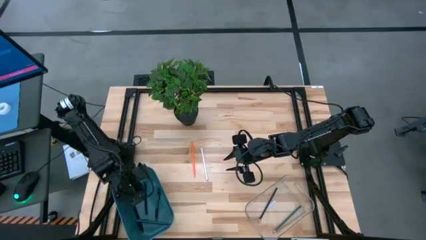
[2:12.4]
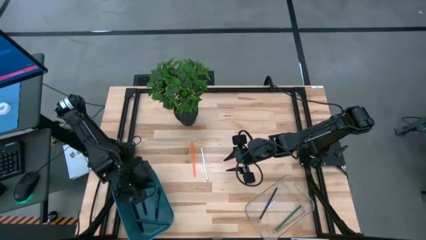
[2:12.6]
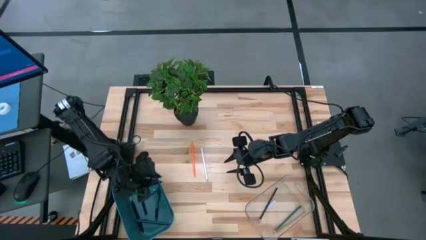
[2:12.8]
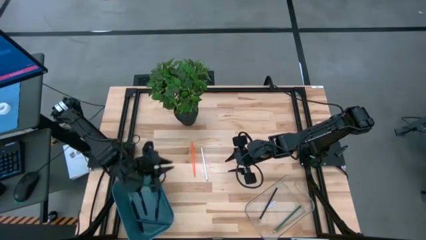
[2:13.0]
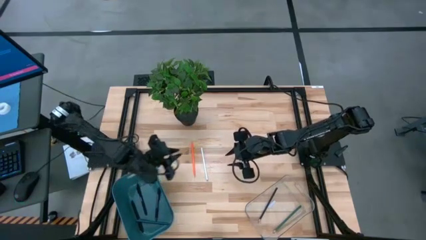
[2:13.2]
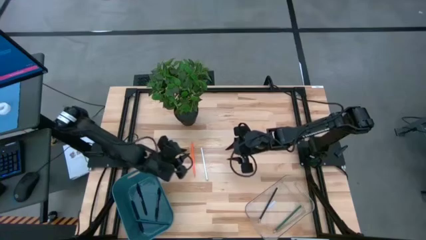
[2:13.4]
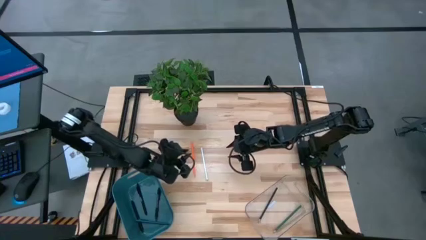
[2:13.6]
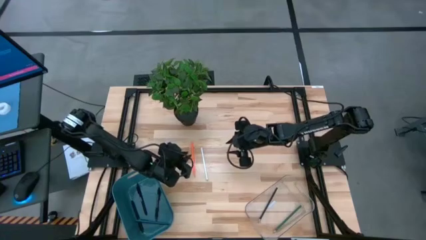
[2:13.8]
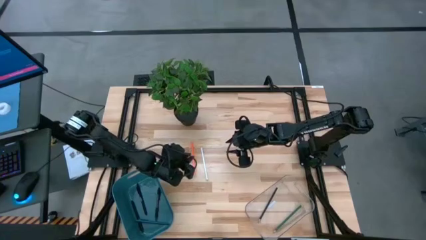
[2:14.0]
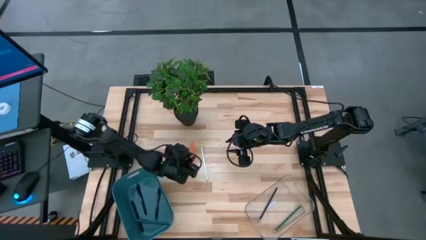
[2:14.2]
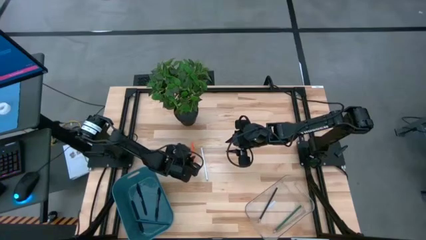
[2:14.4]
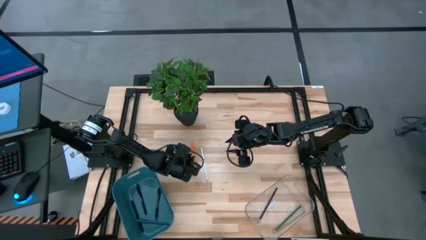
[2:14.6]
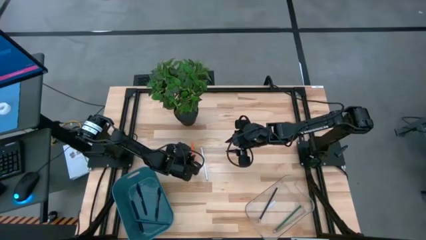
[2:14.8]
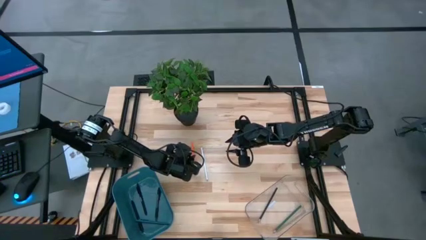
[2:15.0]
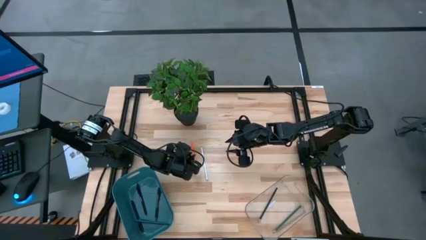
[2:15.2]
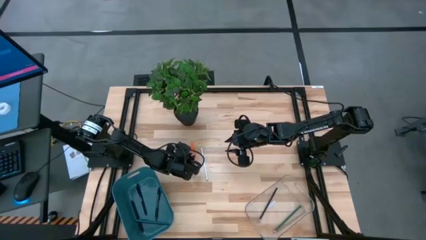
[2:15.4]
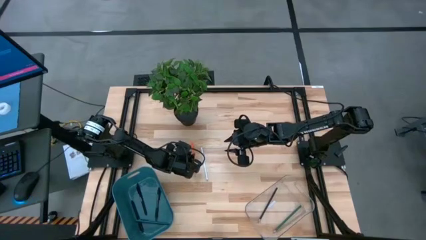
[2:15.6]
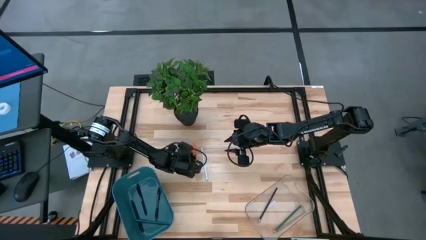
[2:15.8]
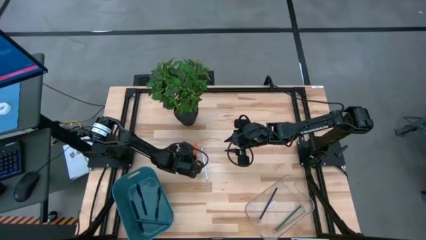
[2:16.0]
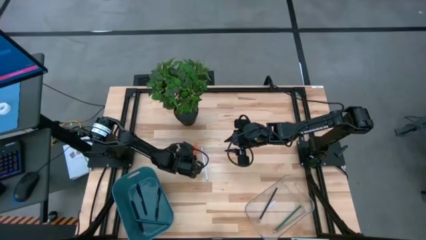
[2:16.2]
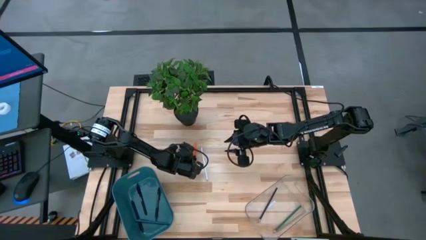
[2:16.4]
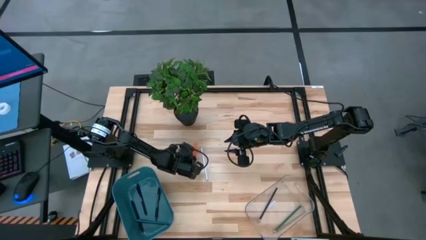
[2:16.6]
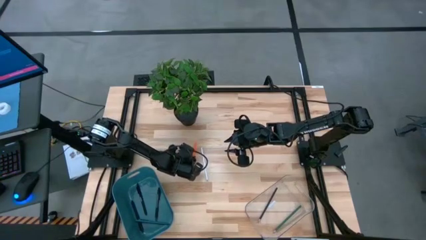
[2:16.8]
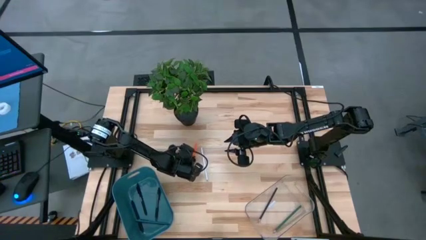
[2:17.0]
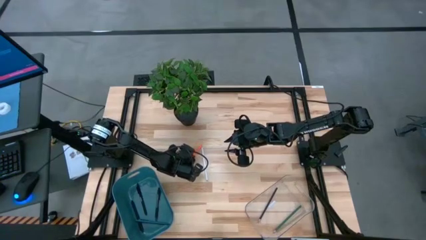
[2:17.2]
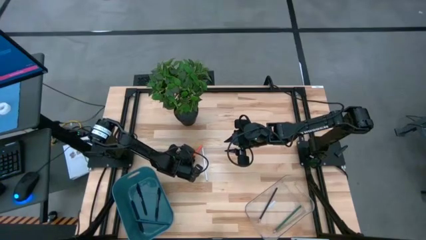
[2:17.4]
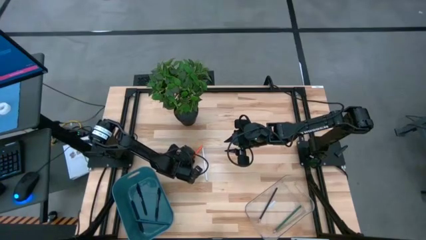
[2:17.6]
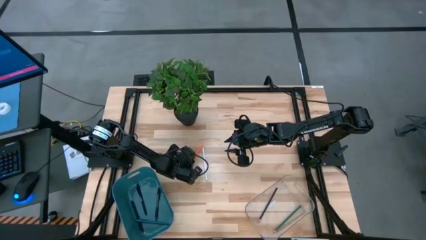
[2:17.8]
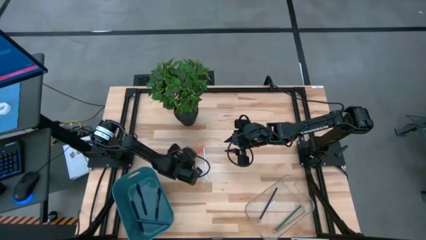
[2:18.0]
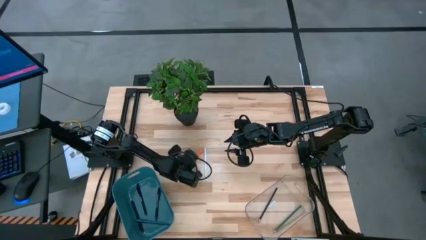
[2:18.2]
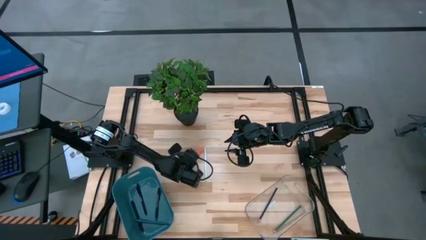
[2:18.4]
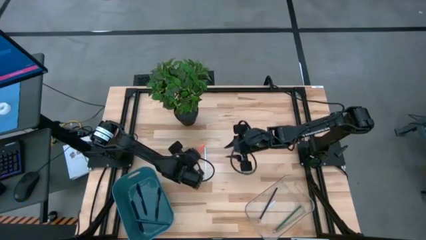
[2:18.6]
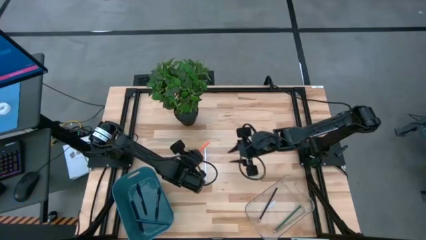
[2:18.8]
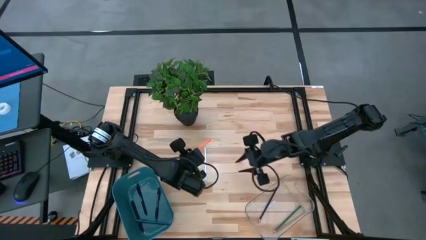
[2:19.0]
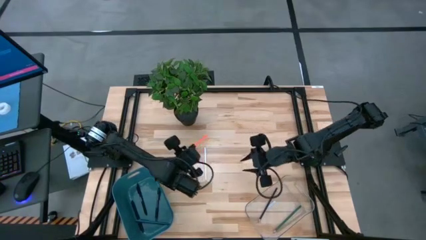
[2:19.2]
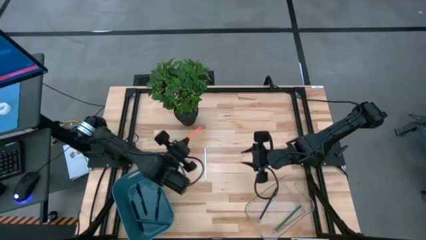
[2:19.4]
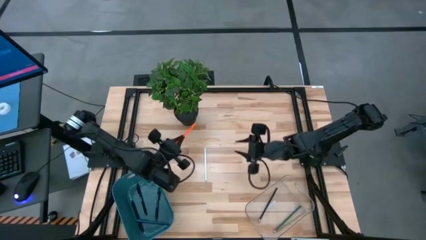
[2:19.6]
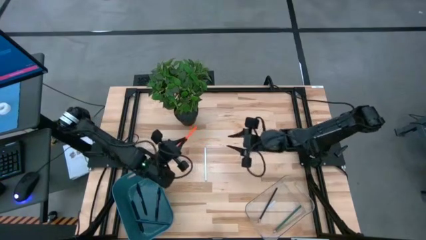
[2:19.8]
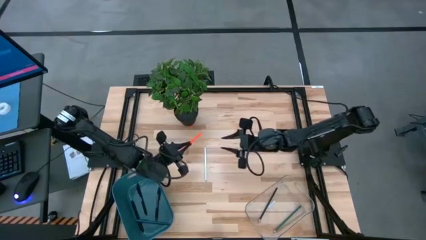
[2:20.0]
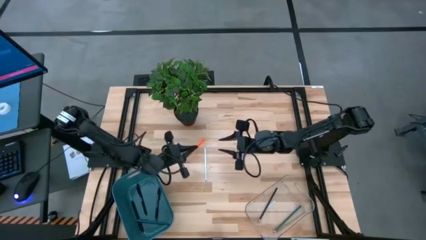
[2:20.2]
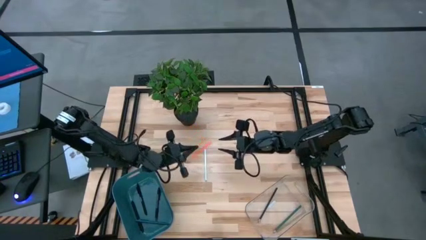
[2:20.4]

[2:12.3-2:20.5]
Task: Sort pens & pencils
Put the orange pencil into the transparent bin

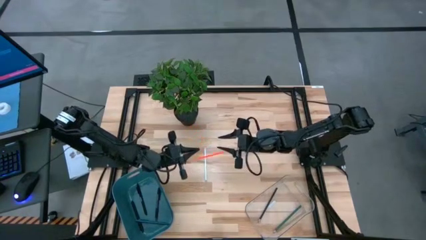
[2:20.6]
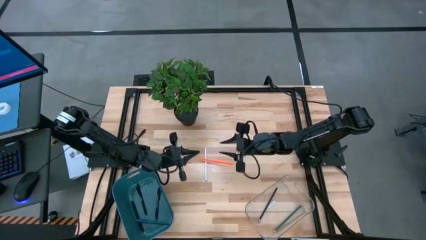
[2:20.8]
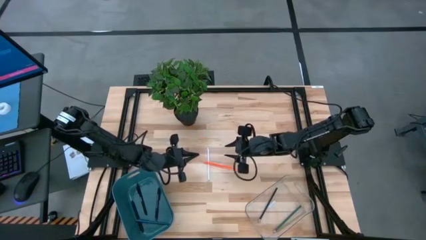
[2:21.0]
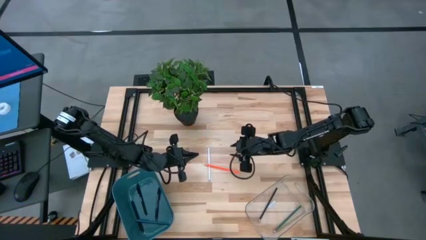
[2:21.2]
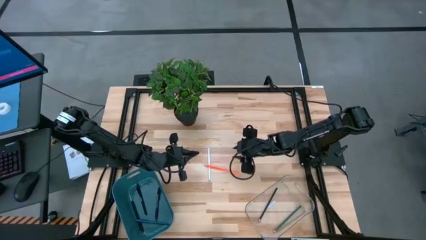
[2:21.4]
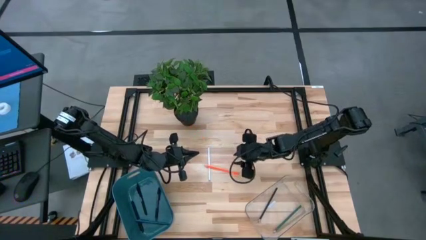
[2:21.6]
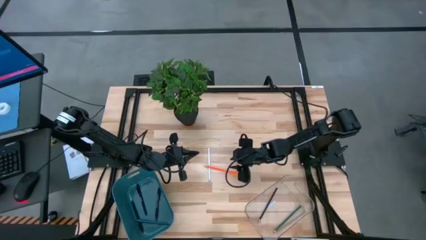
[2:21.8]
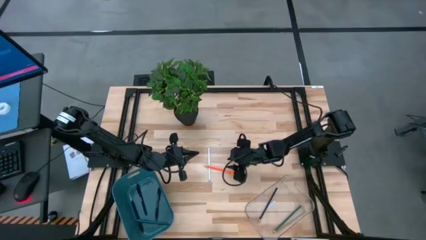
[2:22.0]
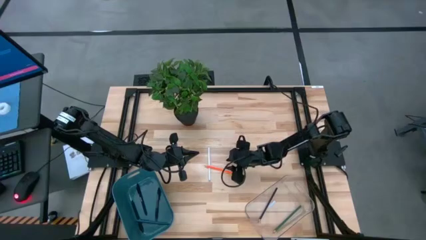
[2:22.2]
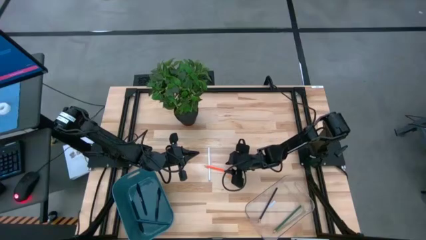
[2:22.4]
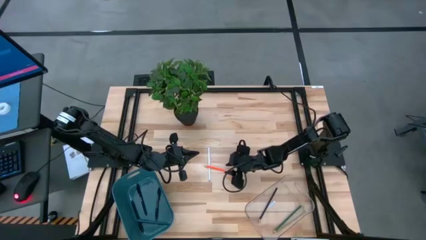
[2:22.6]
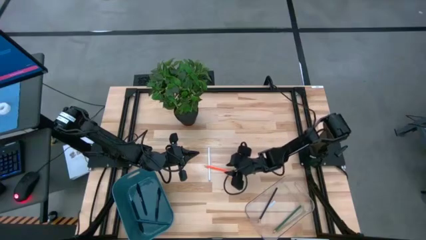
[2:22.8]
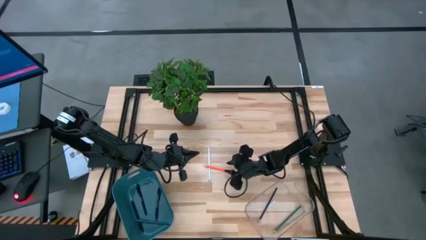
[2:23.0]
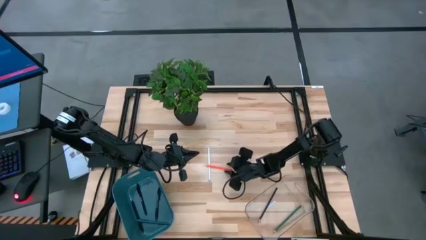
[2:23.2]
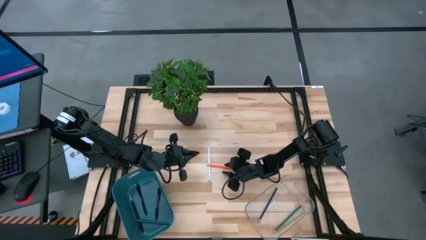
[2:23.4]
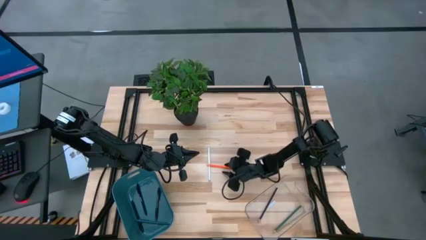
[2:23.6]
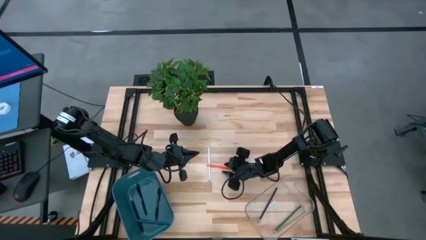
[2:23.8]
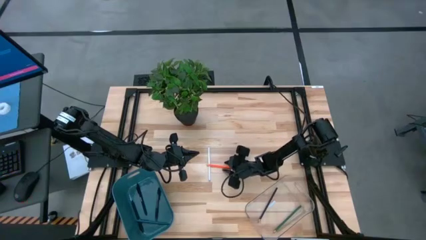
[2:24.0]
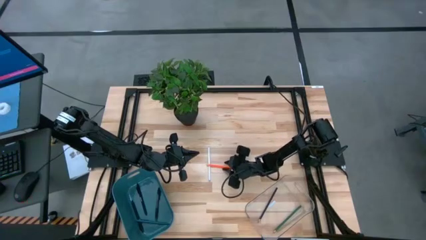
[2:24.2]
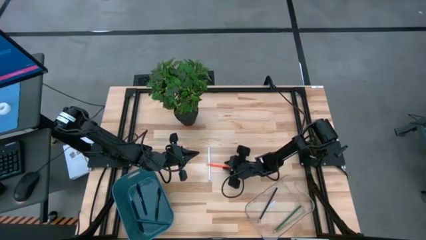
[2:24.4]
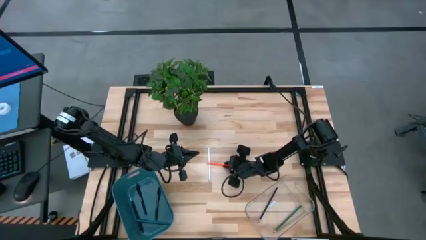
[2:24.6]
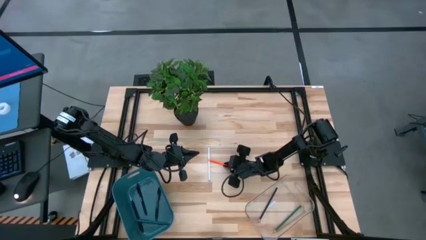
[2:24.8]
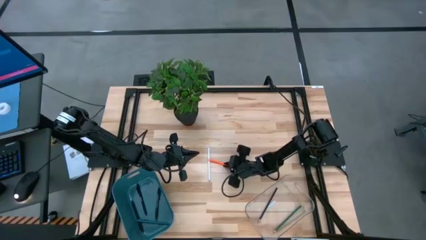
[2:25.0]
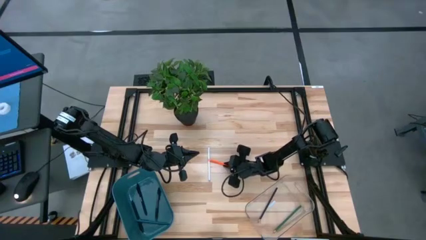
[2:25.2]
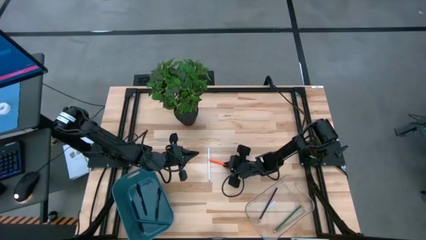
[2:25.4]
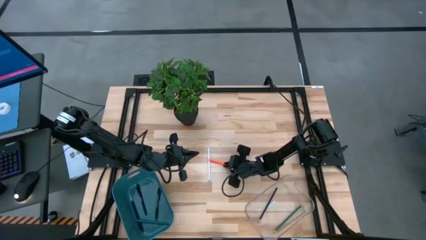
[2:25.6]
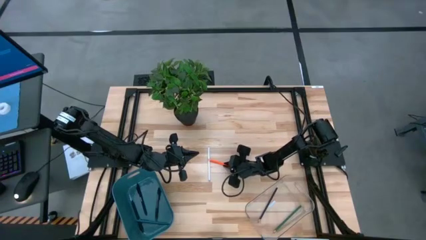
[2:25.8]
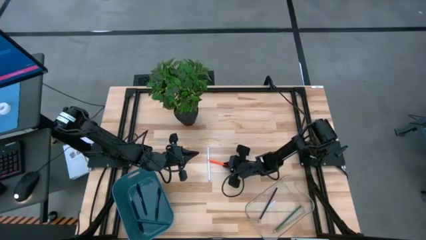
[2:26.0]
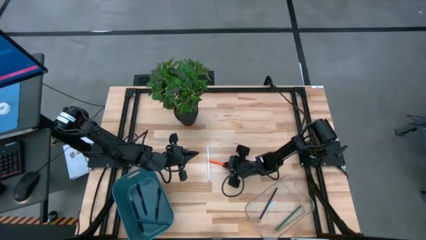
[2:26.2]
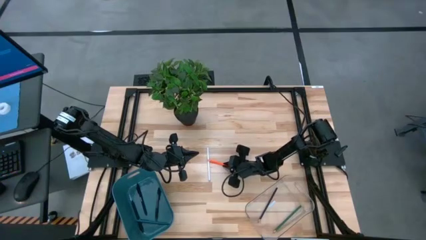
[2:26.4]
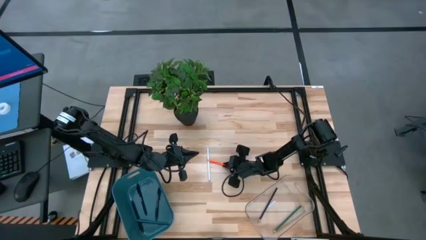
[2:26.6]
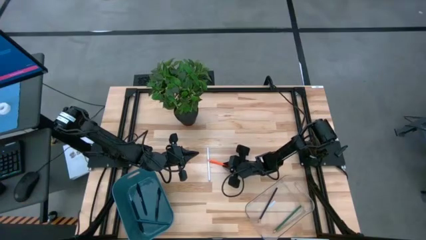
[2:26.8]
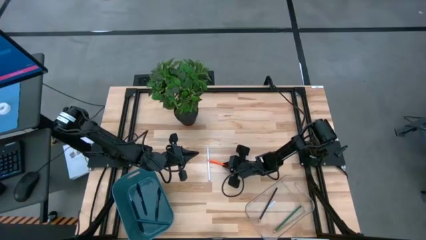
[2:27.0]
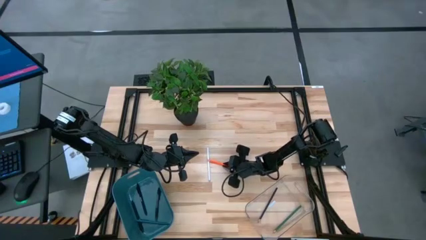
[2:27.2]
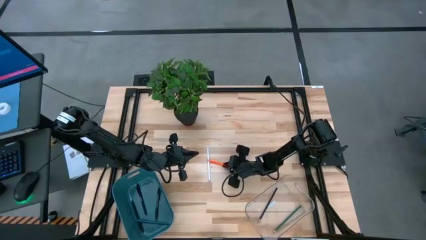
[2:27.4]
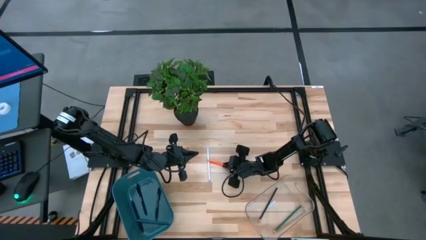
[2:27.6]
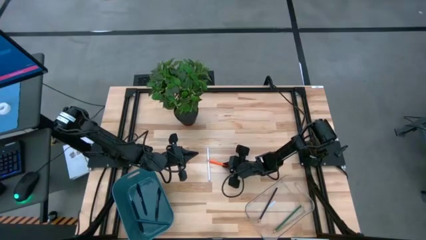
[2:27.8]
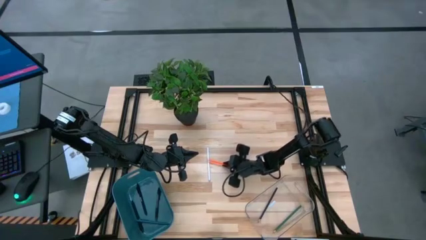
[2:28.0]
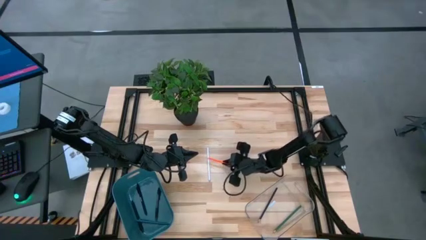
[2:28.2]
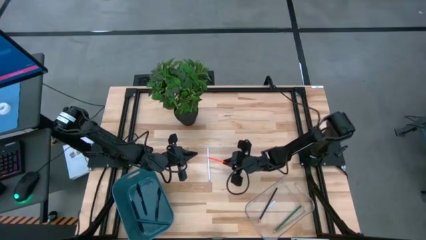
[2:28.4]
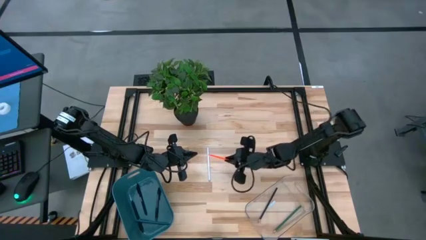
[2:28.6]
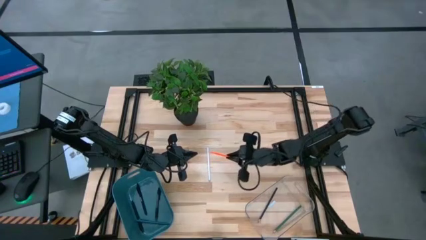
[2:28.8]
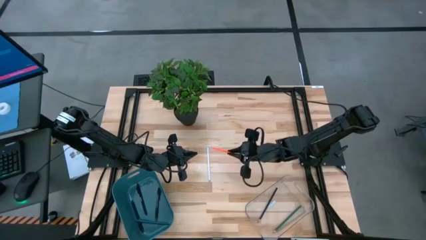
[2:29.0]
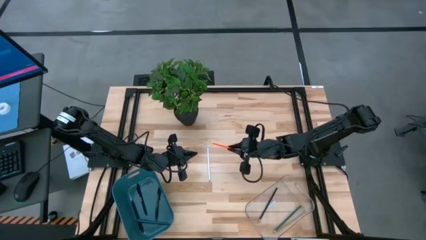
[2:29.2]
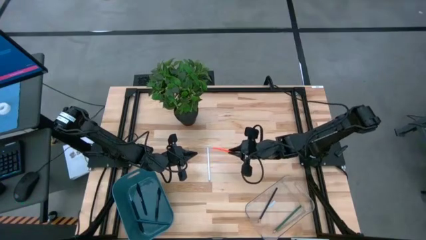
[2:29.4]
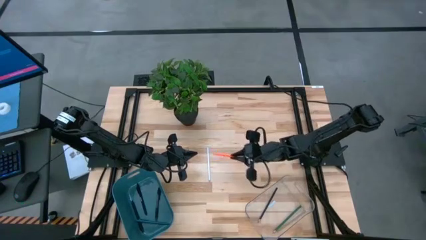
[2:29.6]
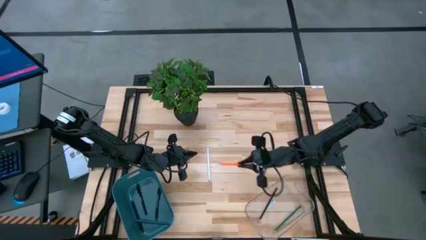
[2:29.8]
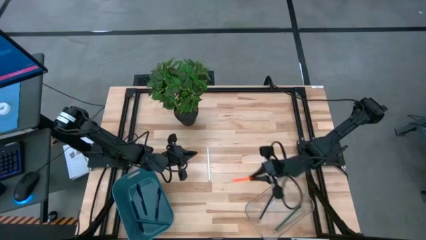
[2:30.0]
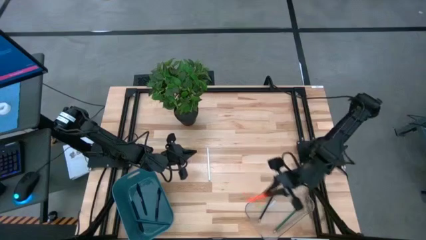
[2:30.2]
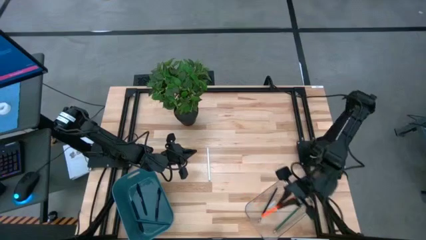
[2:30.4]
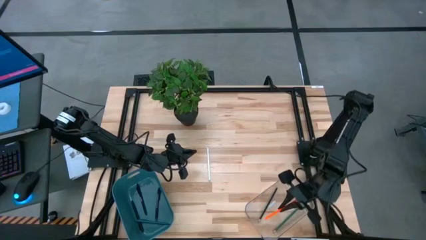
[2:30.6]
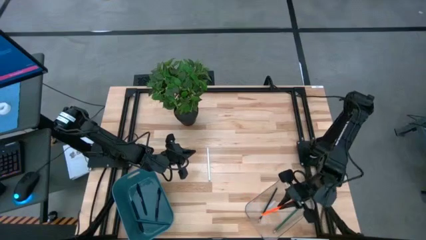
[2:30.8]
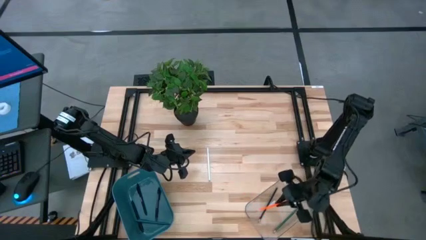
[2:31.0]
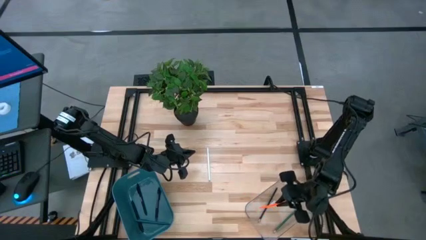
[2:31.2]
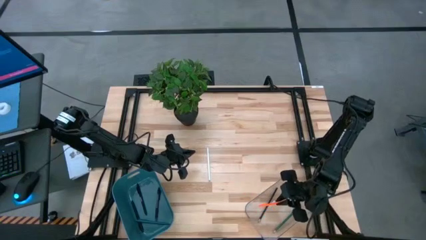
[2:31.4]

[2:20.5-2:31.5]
Put the orange pencil into the transparent bin
